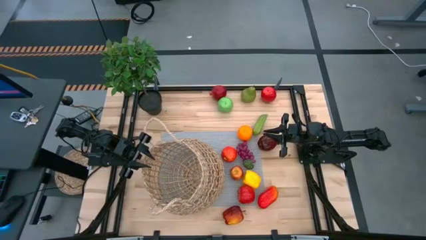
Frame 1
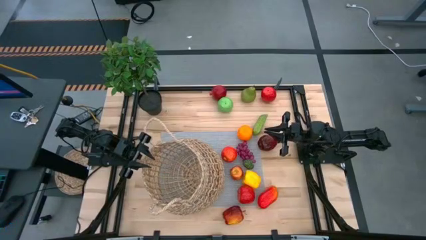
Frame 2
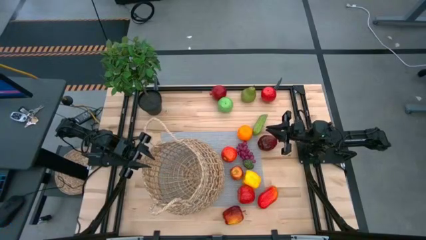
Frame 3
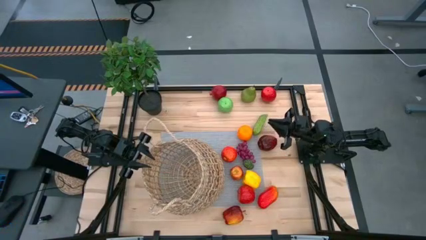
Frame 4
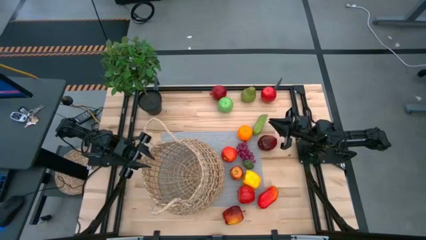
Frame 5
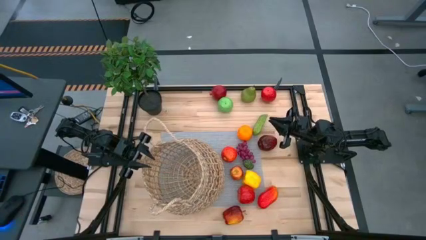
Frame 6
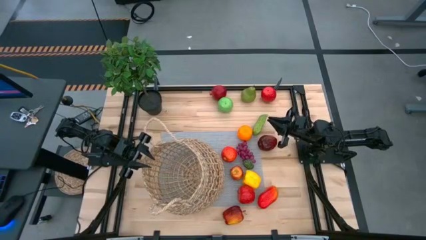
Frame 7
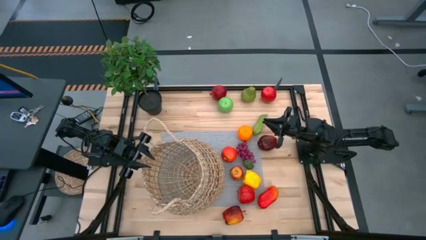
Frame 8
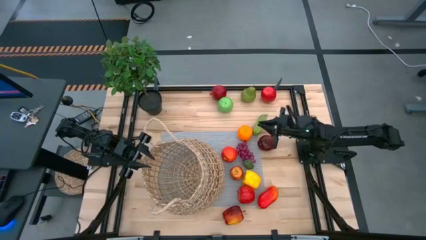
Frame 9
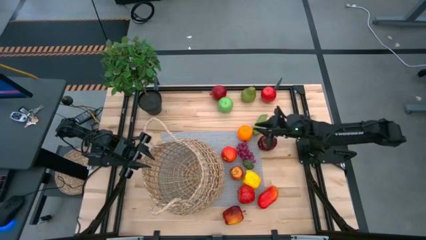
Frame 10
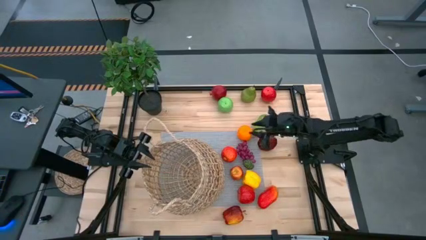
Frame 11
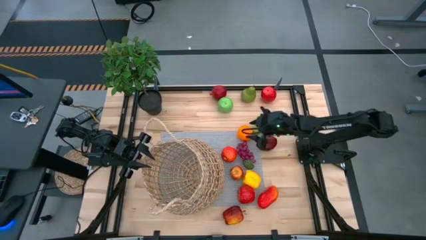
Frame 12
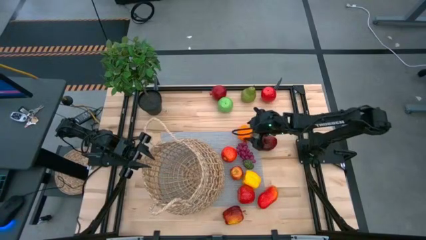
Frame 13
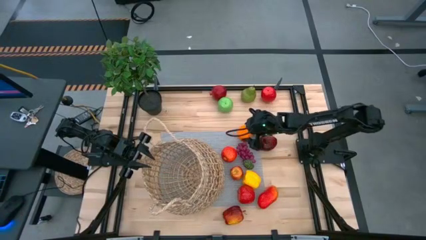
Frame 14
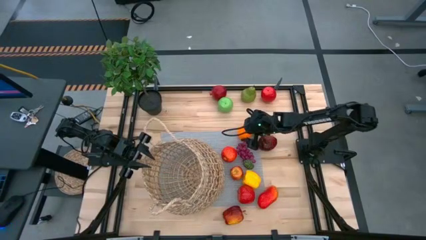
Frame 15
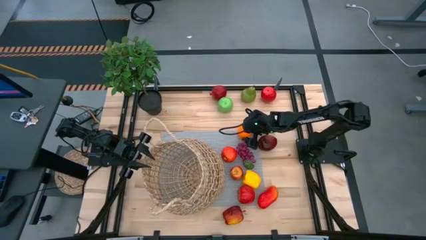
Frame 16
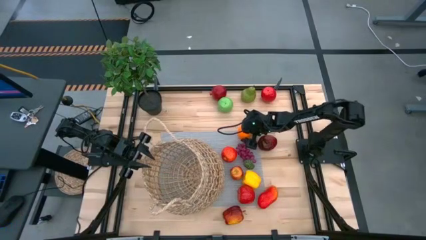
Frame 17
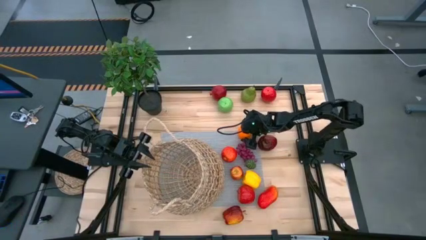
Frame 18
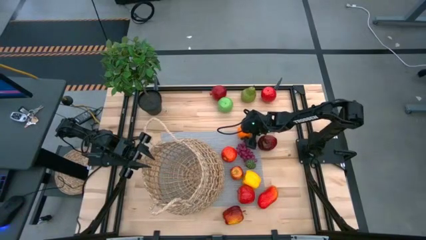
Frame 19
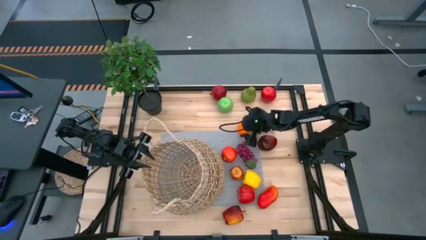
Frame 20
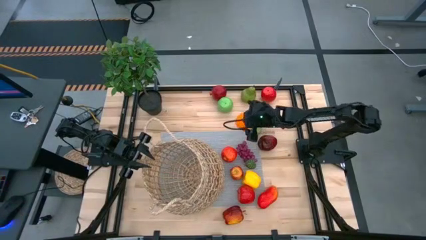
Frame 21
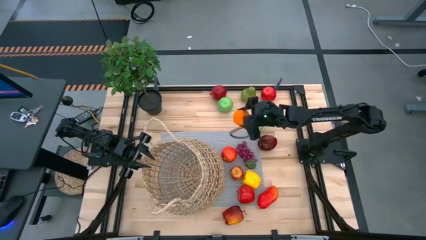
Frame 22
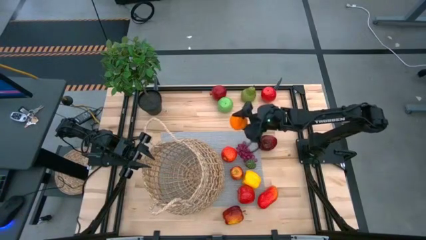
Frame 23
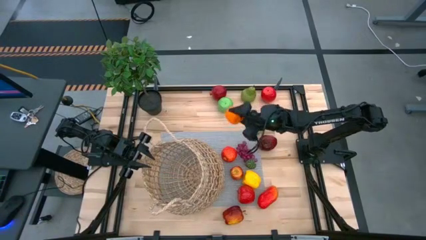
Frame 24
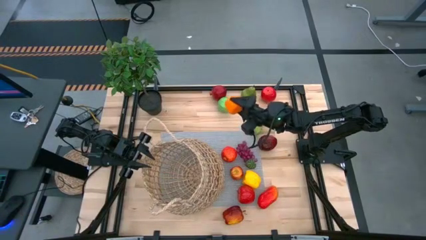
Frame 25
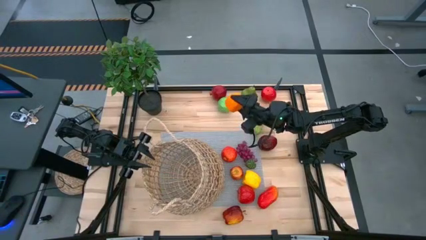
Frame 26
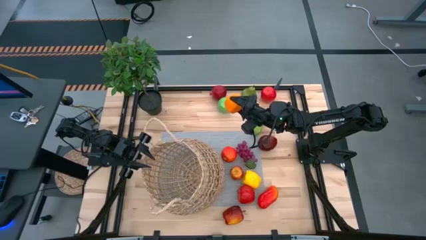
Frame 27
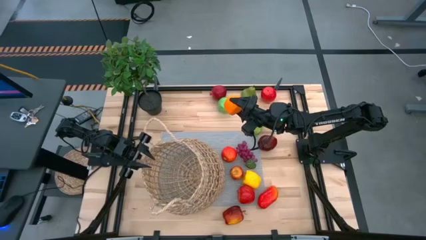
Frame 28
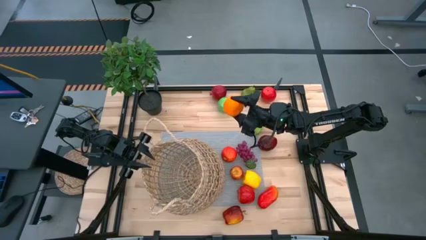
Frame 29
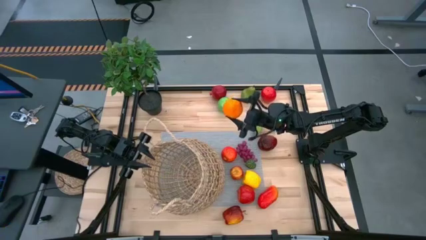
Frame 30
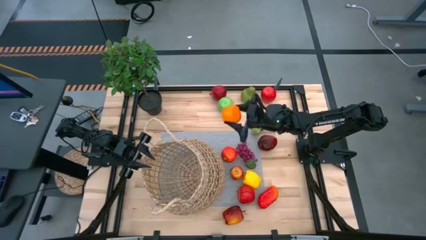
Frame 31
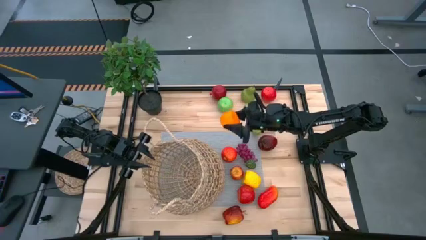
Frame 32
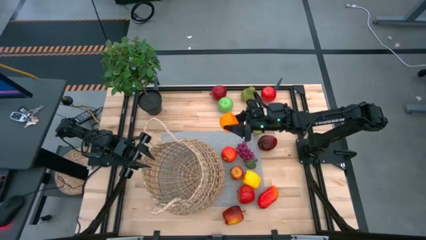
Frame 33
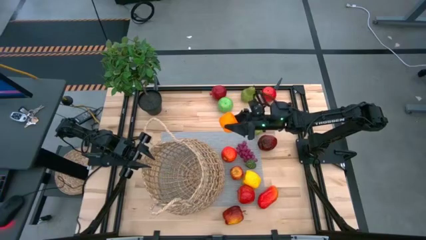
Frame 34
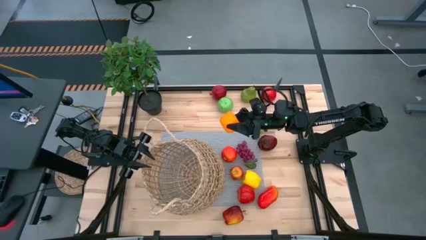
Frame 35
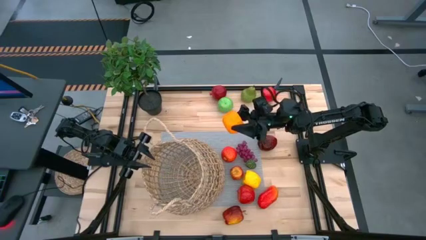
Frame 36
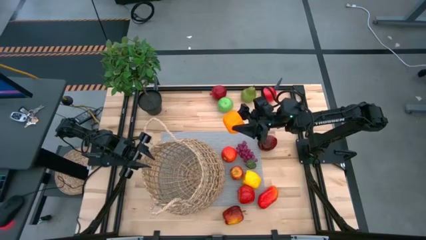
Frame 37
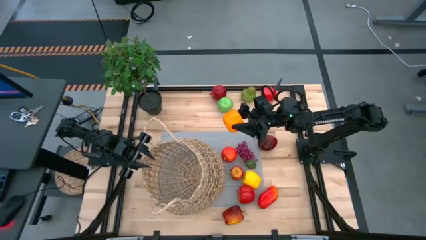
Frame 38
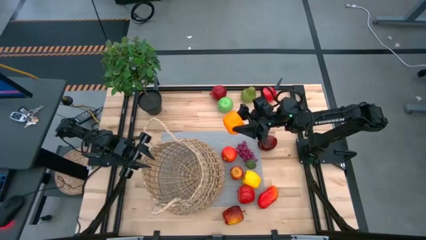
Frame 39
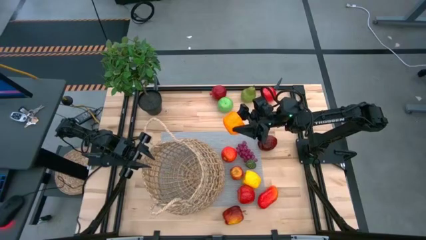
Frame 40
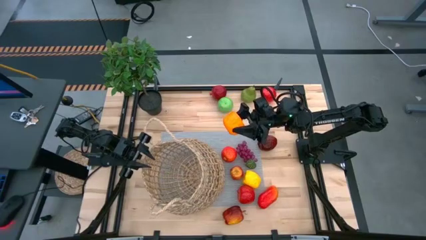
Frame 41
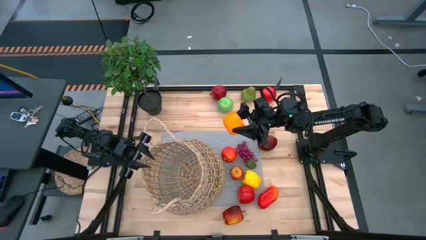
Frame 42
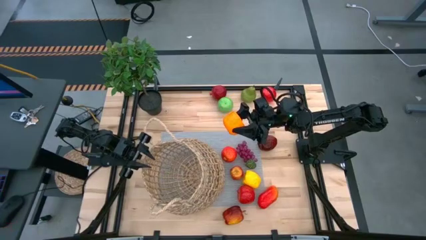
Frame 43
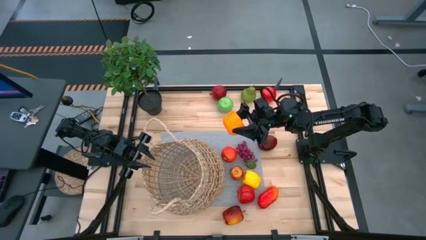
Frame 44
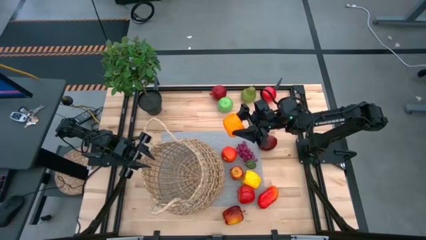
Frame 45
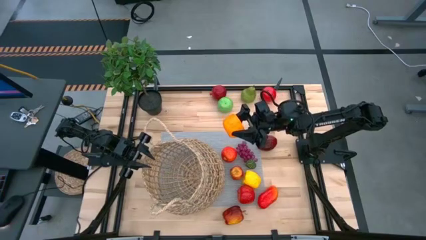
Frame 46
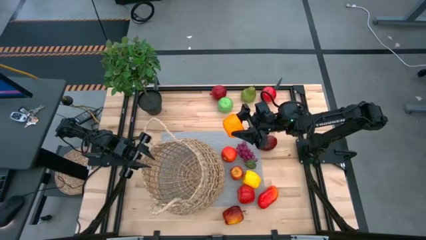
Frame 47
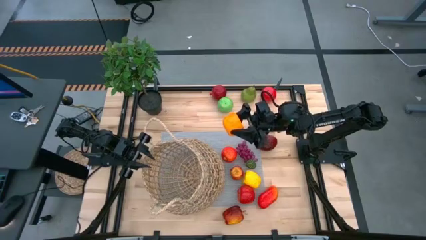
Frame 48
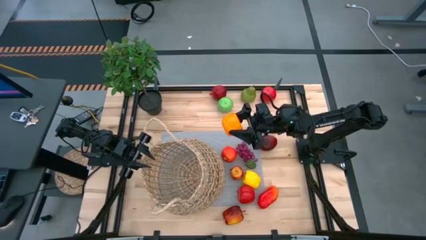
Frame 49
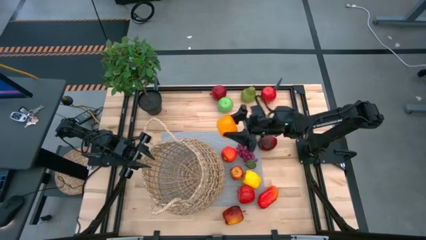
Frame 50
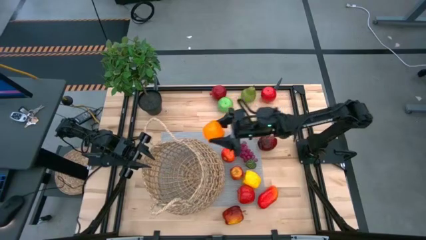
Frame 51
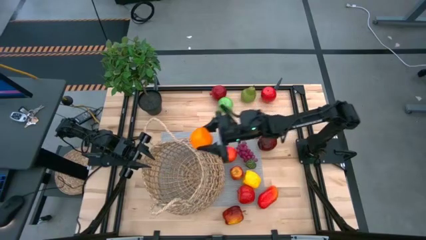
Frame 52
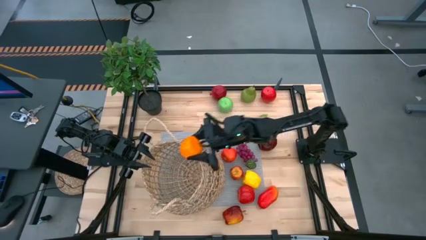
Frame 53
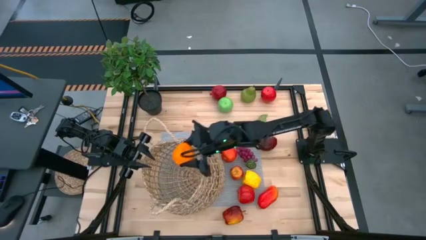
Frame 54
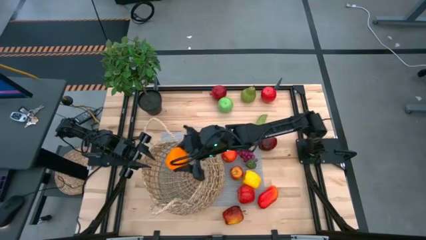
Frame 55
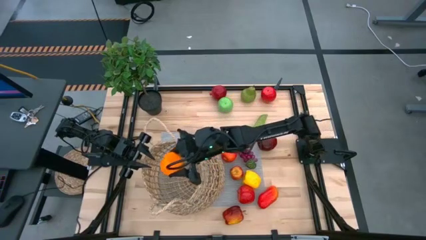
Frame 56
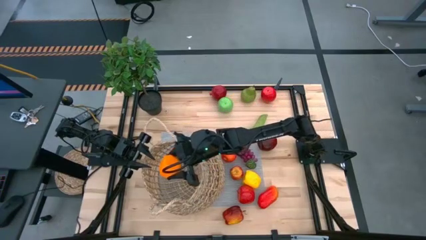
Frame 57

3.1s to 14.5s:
Task: Build produce basket
Put the orange into the brown basket
